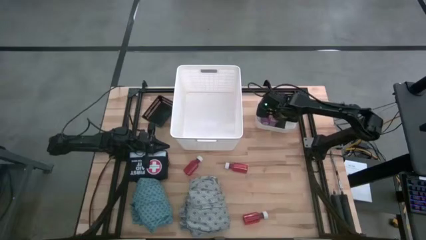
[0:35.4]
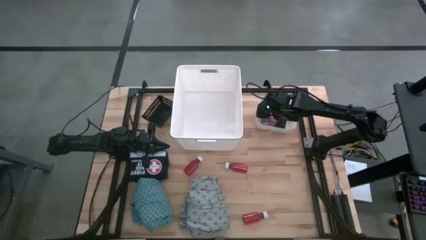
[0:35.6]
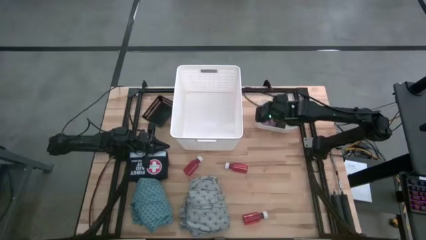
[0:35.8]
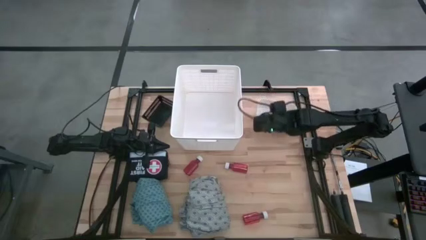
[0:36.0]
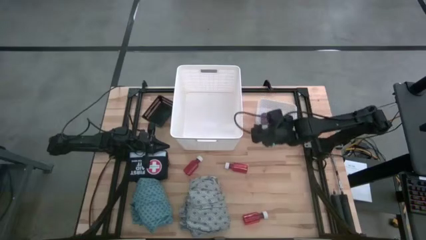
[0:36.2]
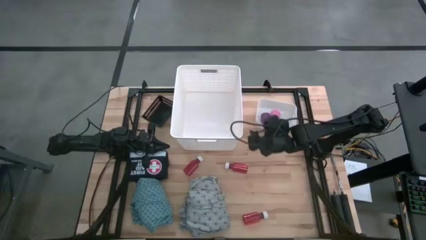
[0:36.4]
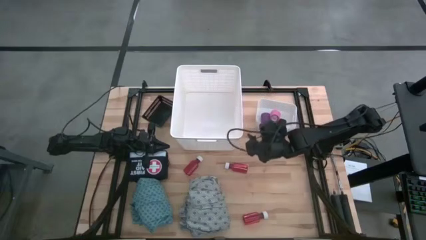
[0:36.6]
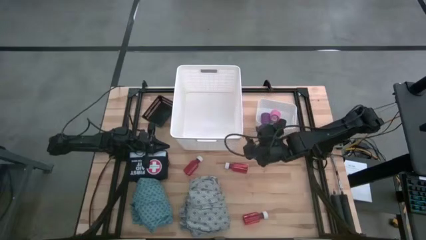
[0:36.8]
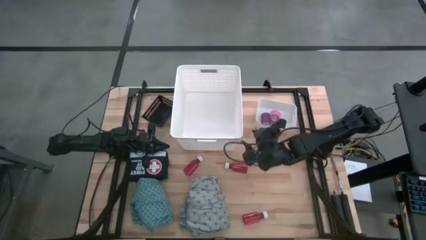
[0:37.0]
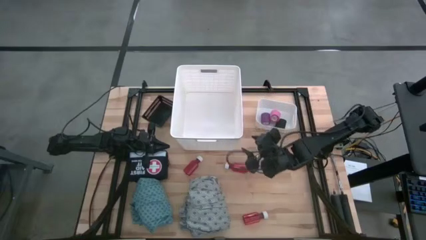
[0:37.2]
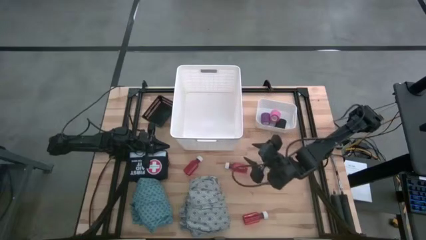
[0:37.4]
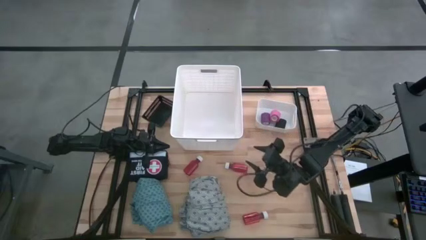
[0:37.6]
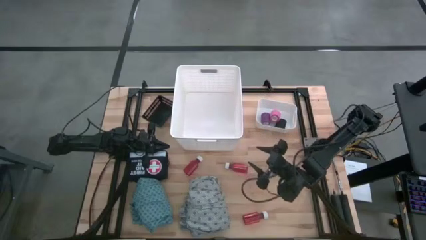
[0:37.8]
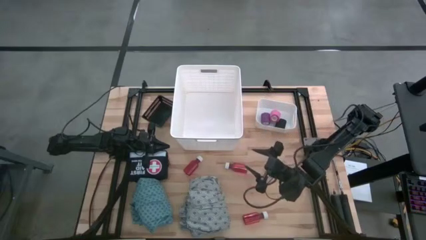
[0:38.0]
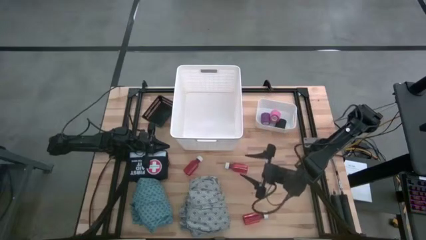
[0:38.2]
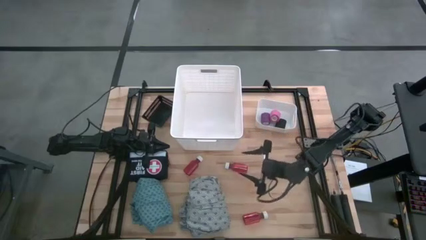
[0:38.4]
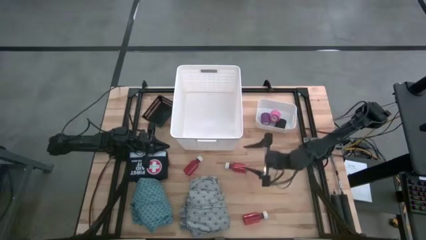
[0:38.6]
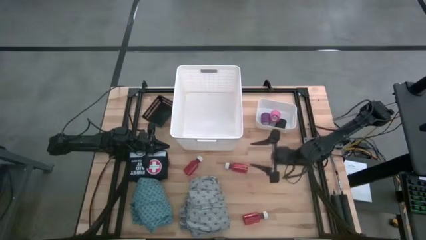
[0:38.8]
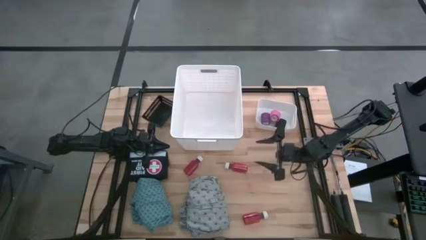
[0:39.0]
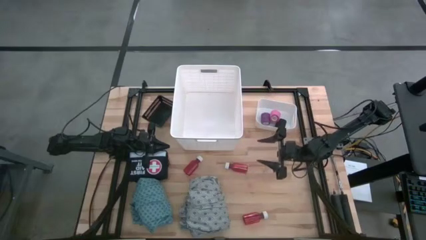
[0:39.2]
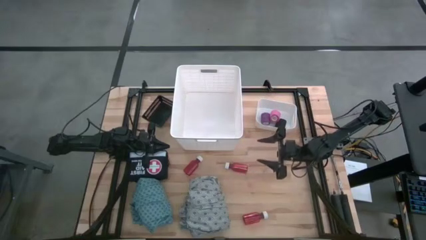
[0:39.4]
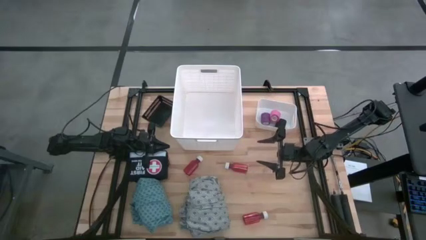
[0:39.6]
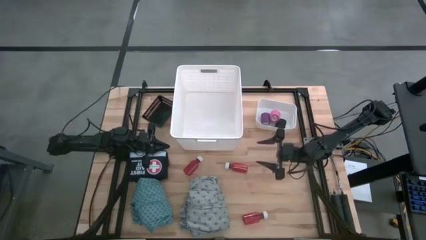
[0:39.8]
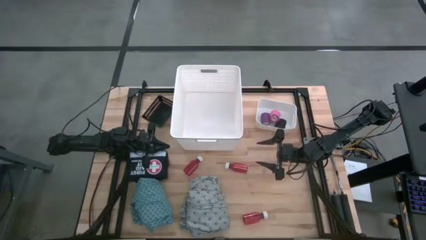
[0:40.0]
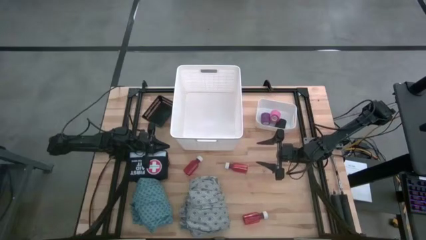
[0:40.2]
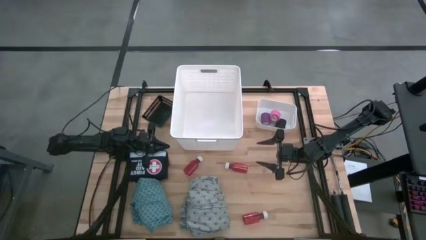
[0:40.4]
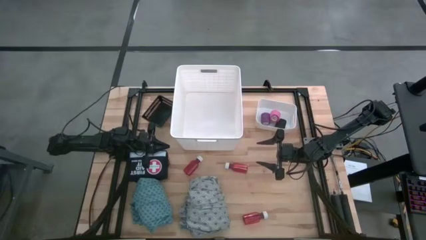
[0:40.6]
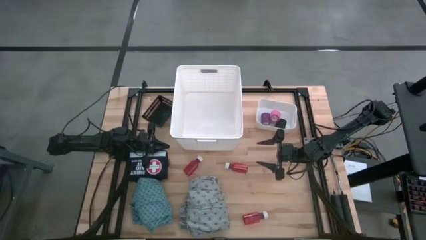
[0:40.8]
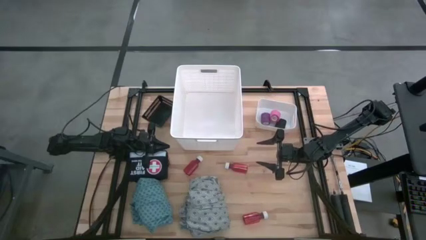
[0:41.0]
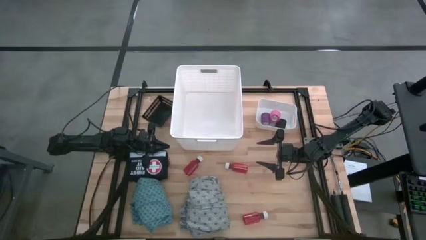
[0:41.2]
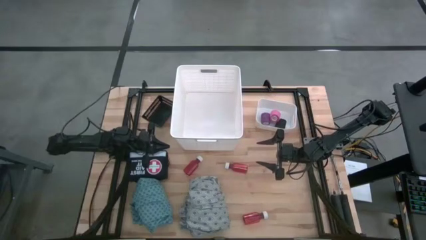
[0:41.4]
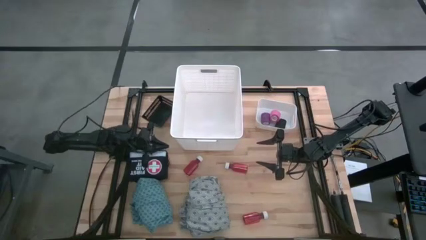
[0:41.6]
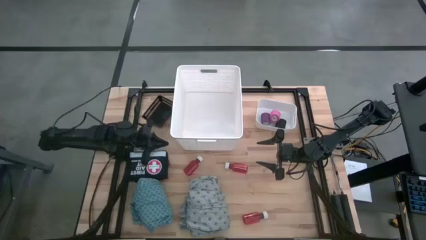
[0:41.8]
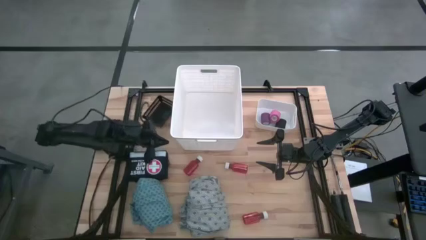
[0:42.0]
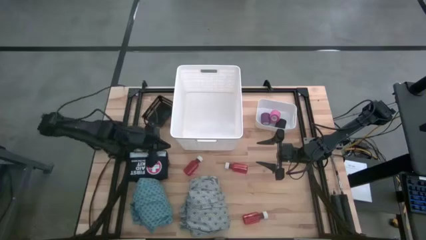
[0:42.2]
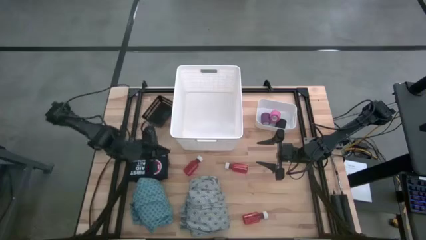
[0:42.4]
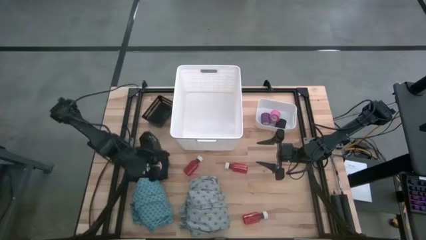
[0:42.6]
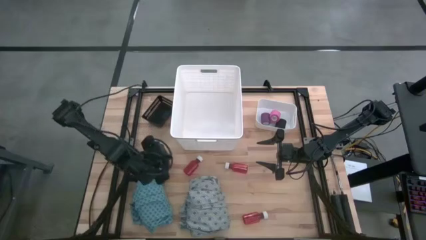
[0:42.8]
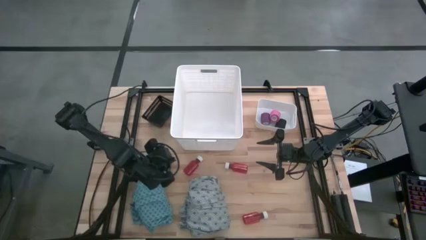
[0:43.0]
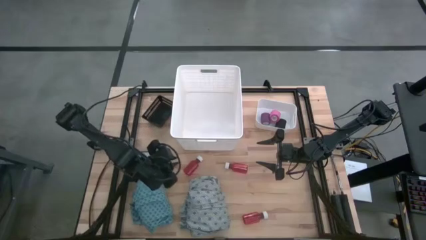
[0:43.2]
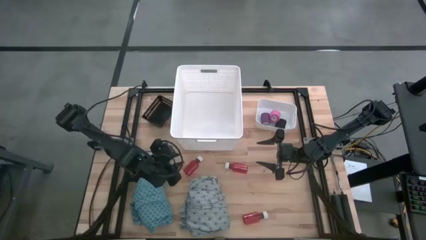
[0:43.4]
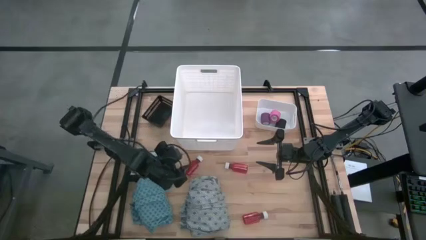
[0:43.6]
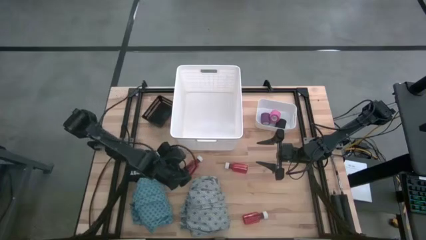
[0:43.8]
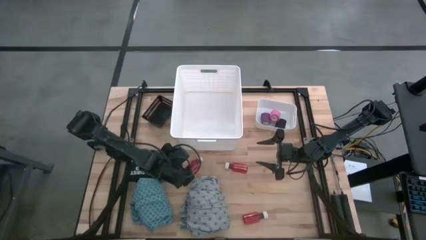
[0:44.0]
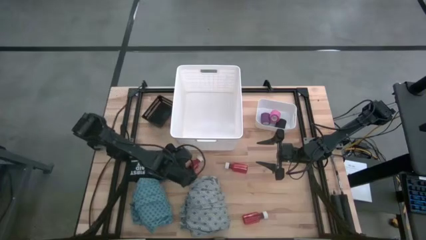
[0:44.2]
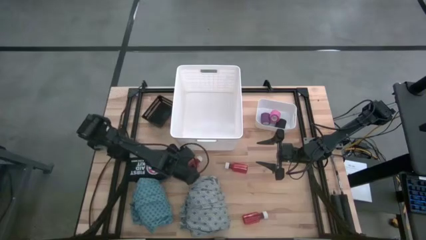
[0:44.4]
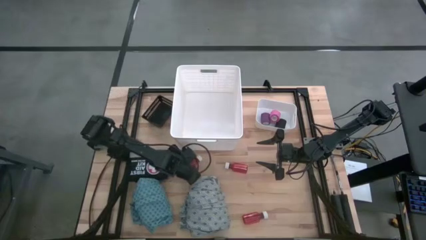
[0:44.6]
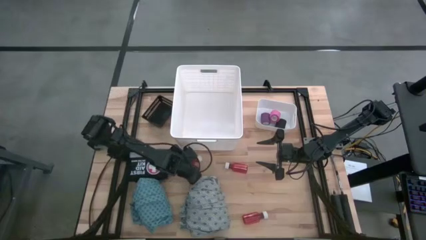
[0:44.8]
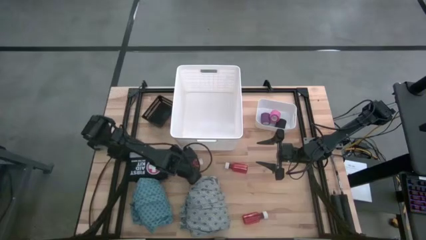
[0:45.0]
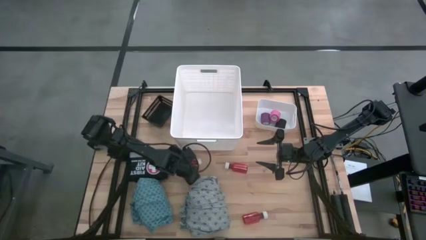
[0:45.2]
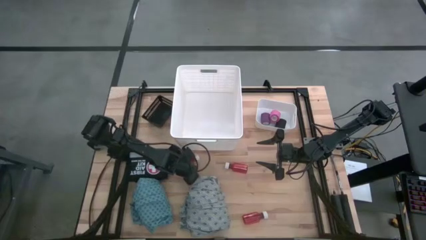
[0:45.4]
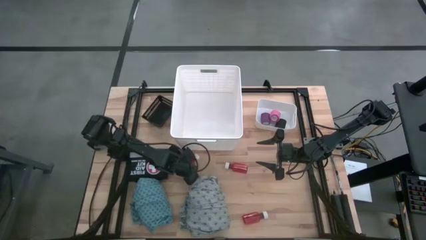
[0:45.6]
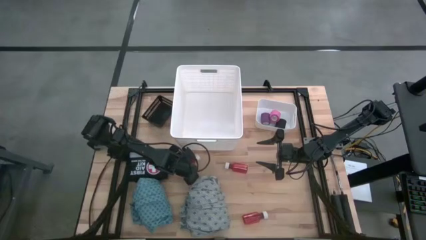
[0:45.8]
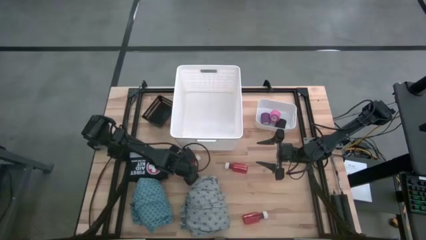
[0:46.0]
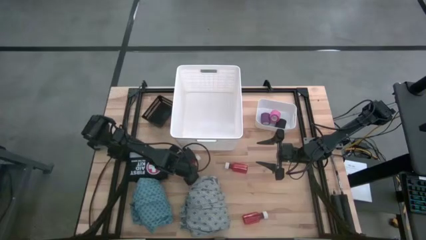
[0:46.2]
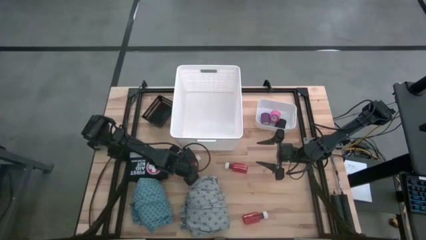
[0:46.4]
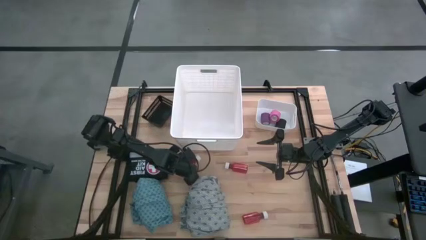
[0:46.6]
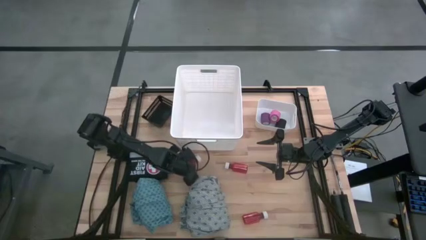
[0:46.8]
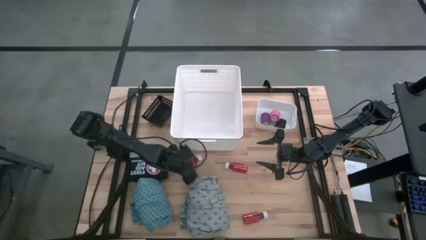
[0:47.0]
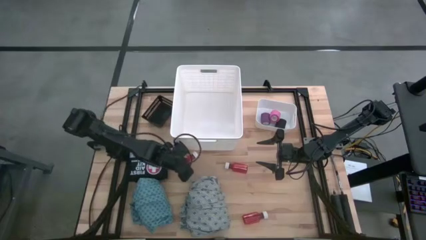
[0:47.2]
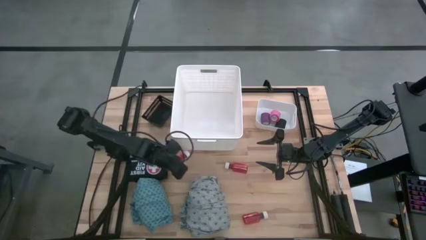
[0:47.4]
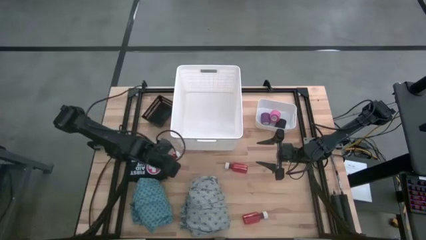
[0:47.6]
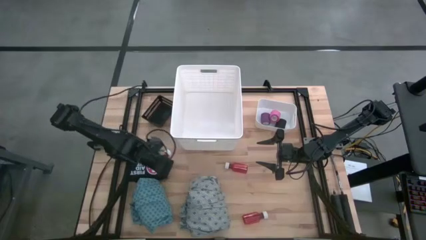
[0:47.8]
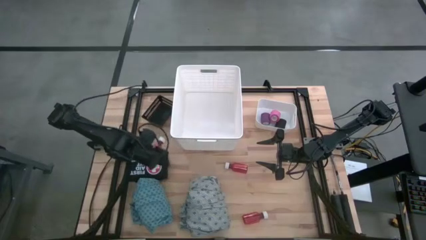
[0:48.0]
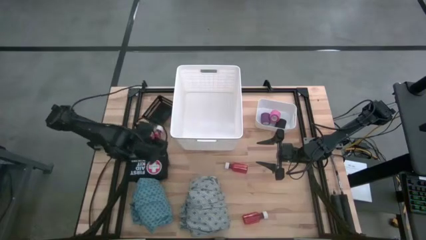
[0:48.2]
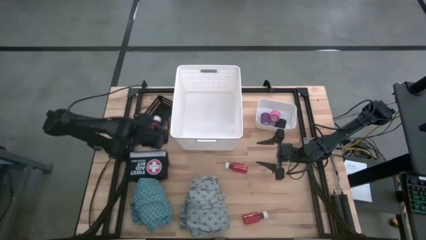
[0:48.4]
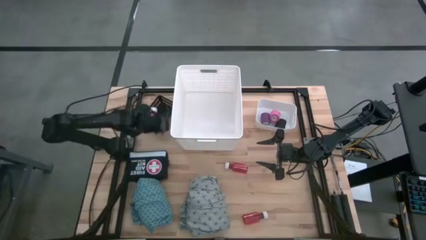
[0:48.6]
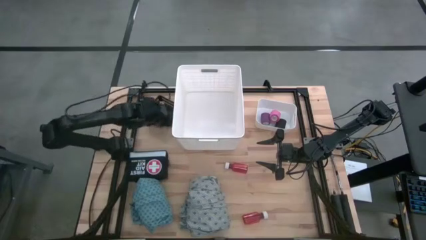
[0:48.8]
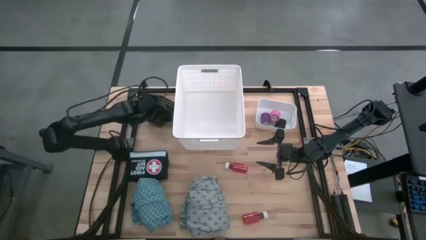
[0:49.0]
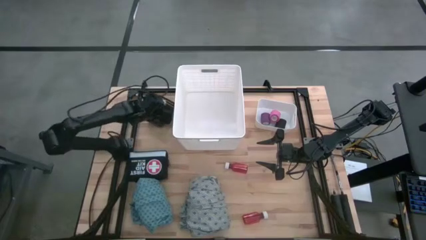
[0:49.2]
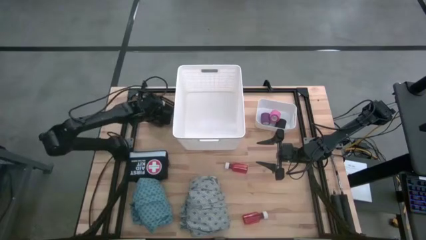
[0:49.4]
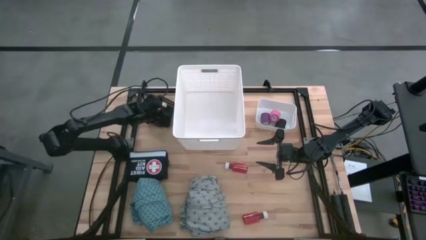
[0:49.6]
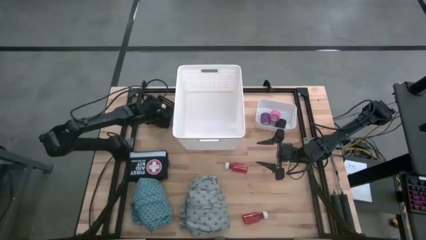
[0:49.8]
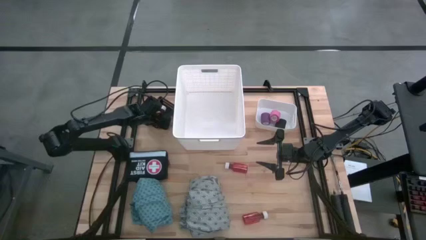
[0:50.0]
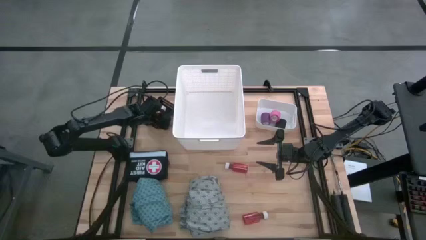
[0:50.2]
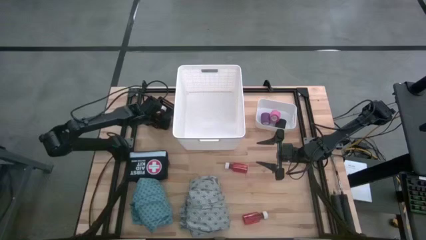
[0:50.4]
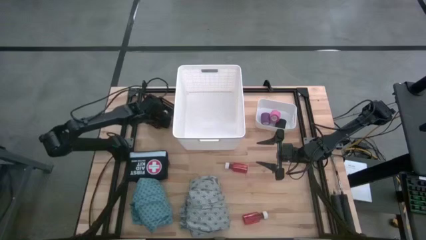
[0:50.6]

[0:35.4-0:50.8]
Task: Pick & Place Medicine items
Put the top left red medicine bottle into the black bin
